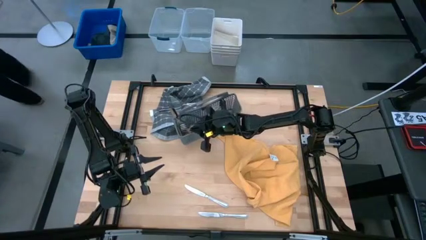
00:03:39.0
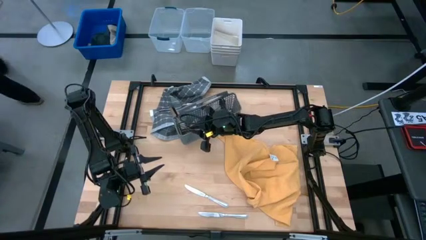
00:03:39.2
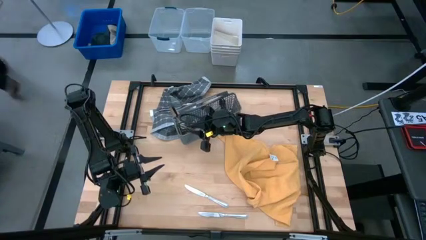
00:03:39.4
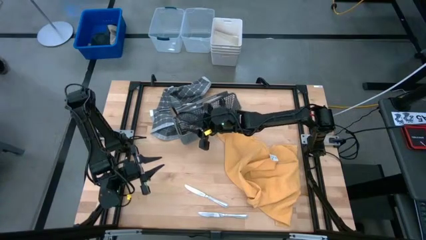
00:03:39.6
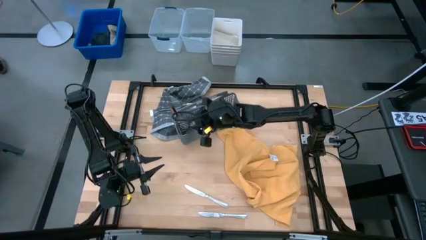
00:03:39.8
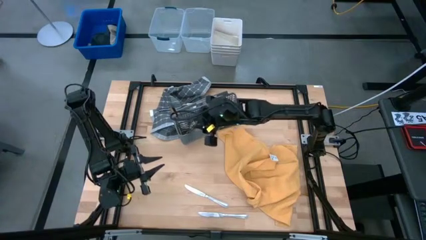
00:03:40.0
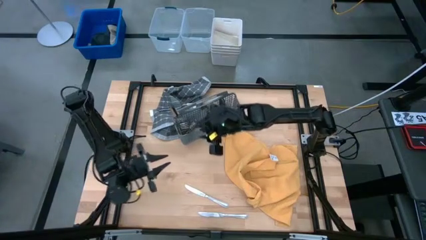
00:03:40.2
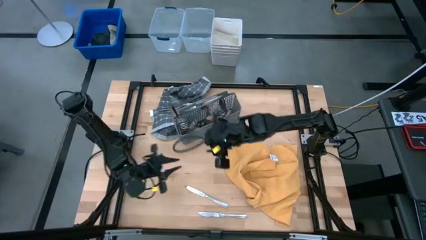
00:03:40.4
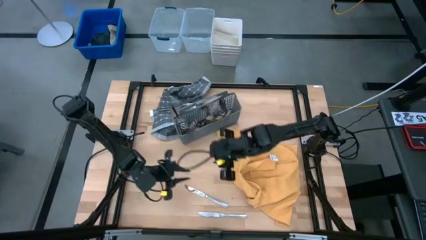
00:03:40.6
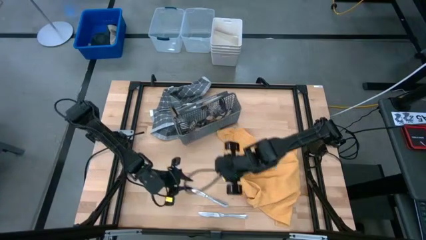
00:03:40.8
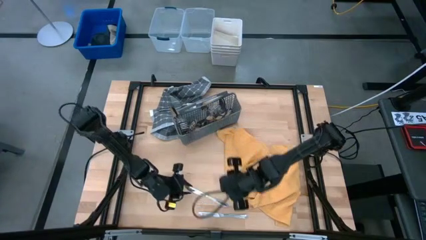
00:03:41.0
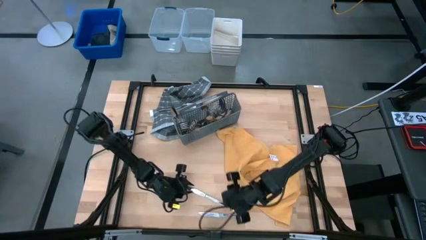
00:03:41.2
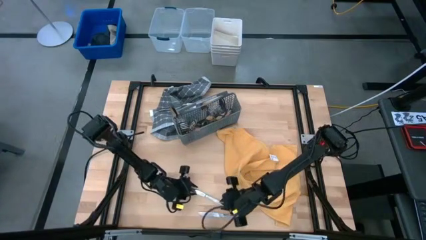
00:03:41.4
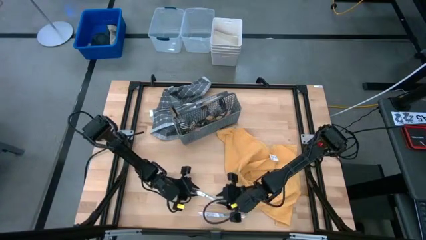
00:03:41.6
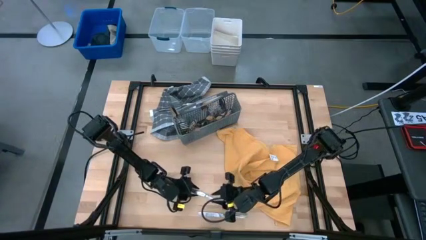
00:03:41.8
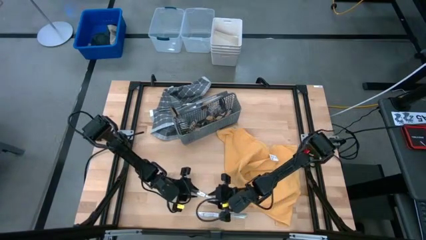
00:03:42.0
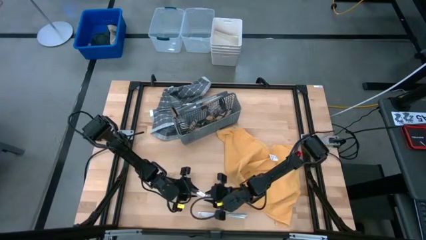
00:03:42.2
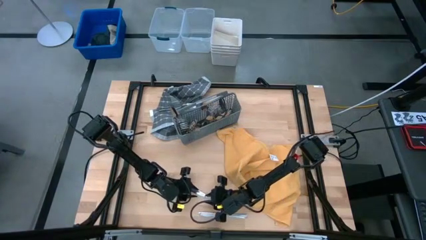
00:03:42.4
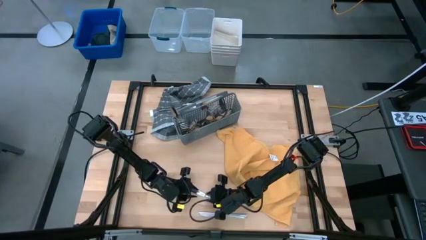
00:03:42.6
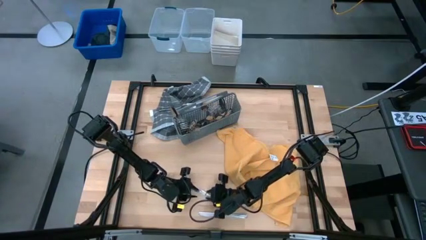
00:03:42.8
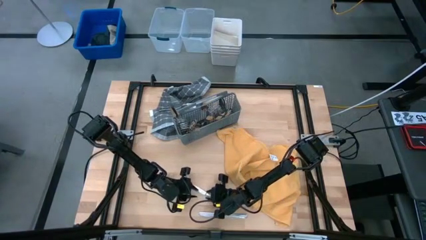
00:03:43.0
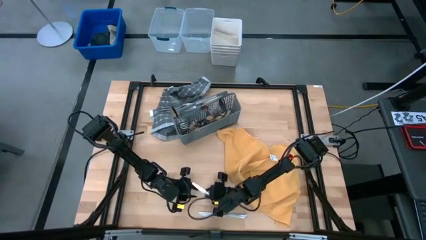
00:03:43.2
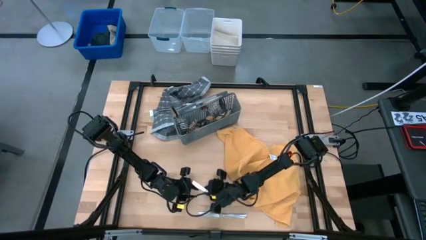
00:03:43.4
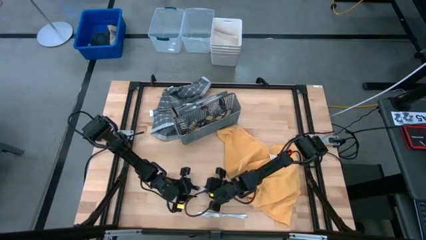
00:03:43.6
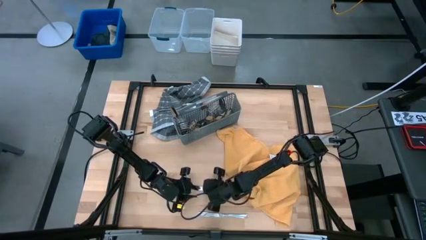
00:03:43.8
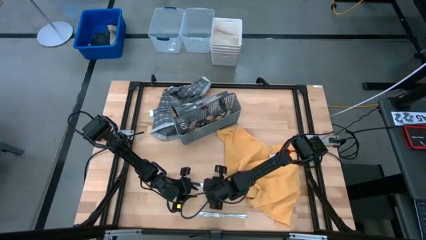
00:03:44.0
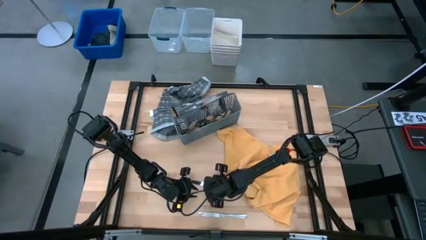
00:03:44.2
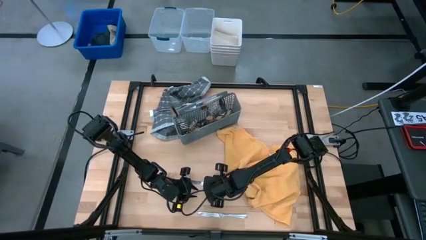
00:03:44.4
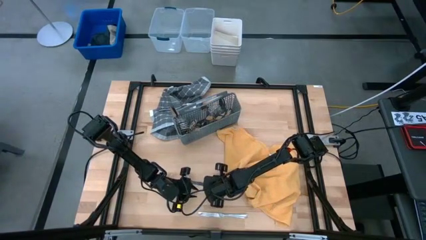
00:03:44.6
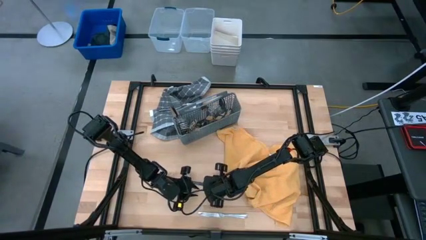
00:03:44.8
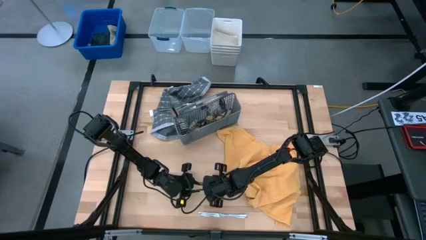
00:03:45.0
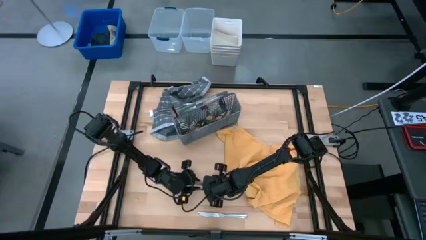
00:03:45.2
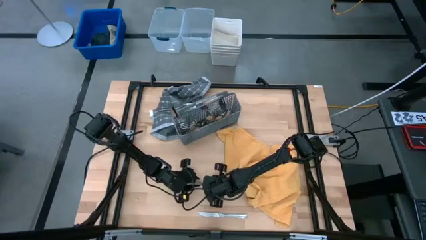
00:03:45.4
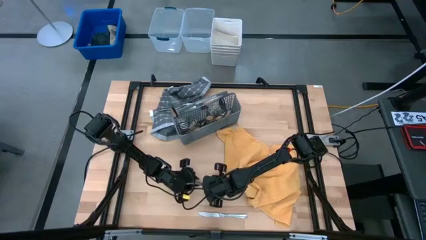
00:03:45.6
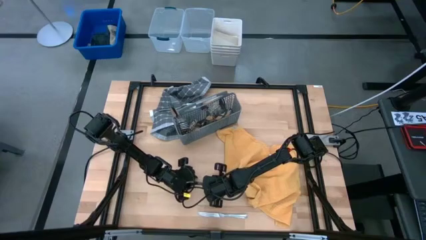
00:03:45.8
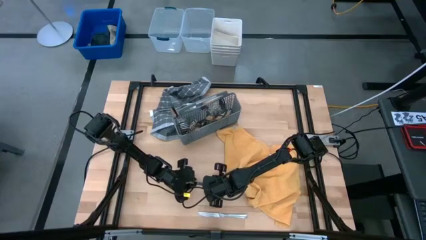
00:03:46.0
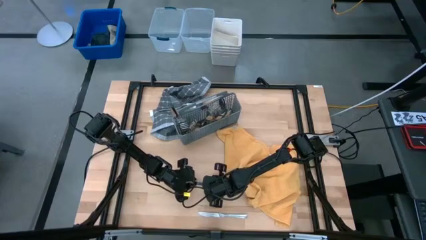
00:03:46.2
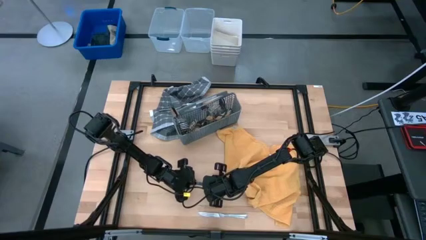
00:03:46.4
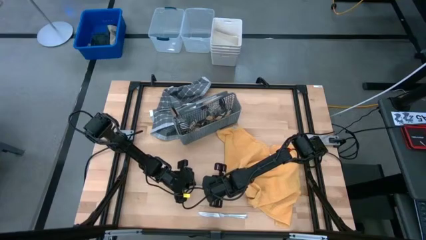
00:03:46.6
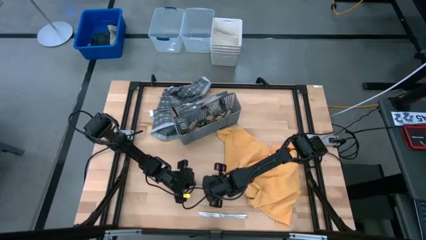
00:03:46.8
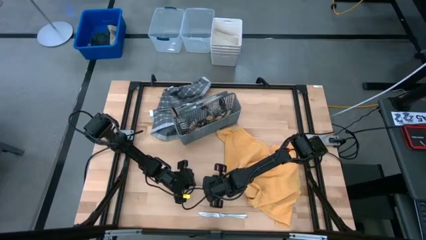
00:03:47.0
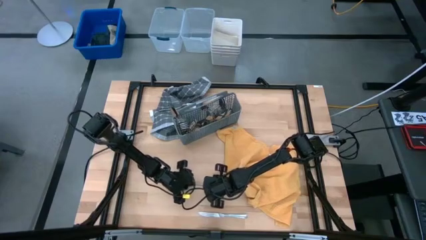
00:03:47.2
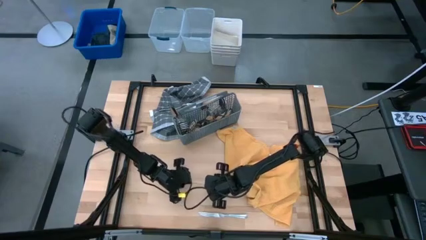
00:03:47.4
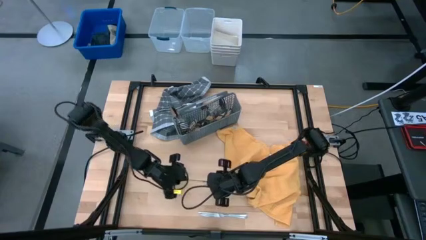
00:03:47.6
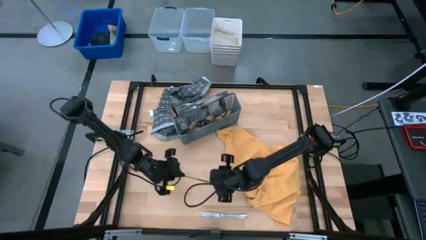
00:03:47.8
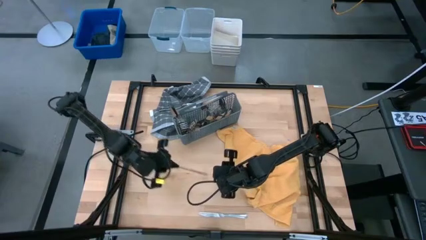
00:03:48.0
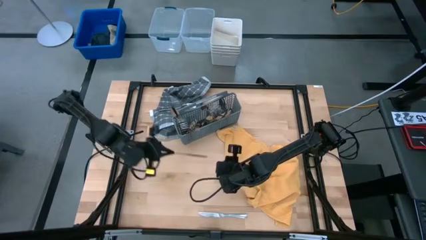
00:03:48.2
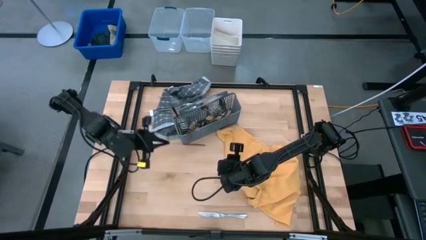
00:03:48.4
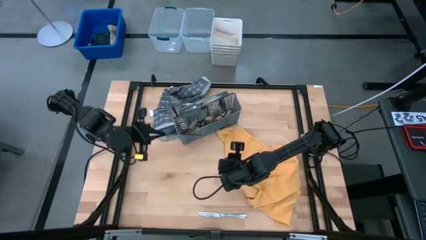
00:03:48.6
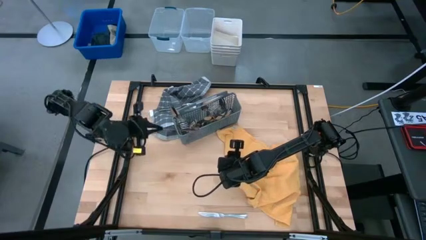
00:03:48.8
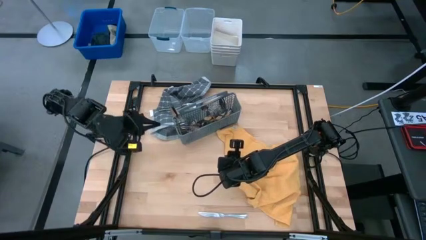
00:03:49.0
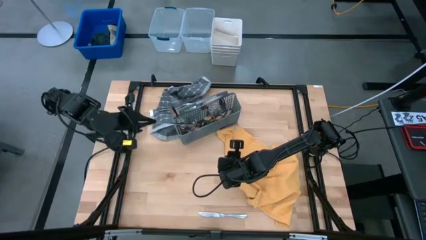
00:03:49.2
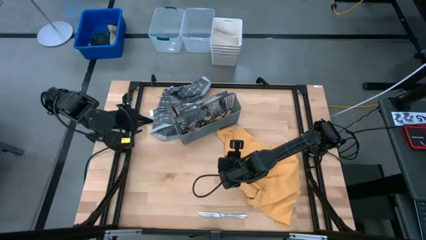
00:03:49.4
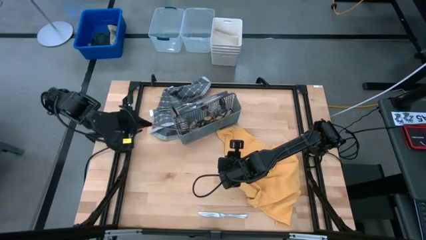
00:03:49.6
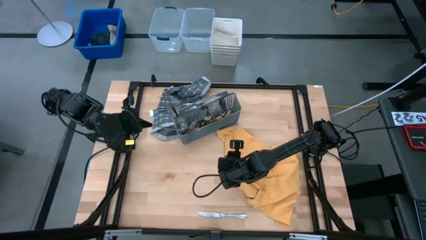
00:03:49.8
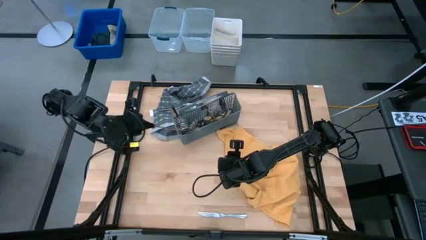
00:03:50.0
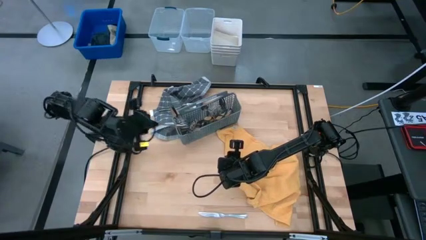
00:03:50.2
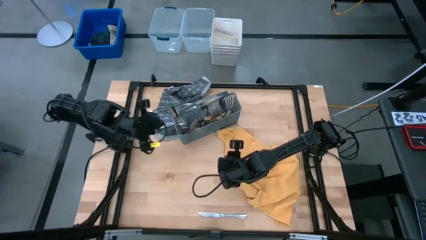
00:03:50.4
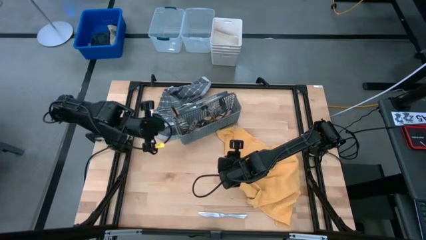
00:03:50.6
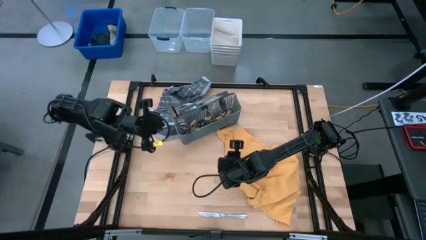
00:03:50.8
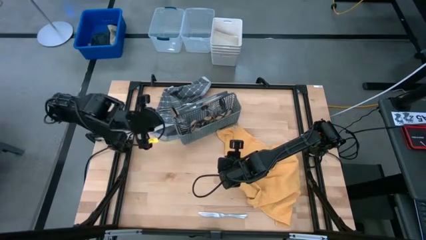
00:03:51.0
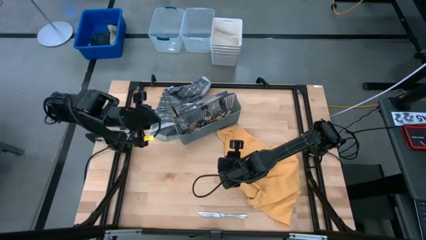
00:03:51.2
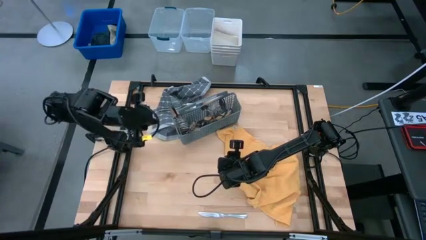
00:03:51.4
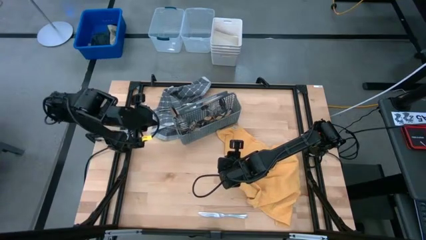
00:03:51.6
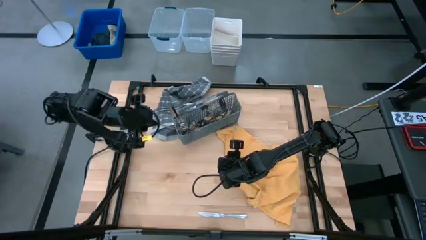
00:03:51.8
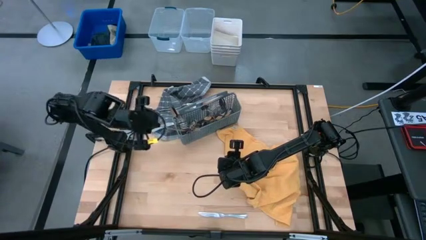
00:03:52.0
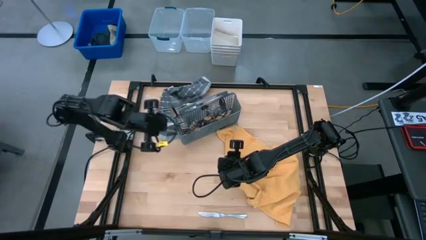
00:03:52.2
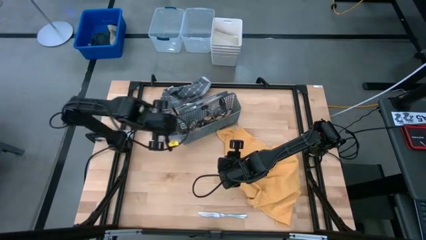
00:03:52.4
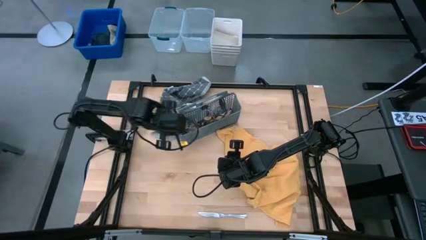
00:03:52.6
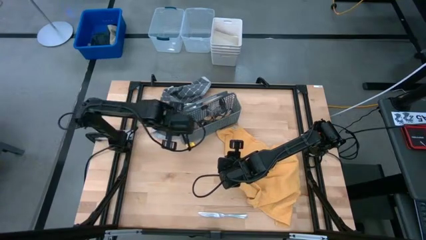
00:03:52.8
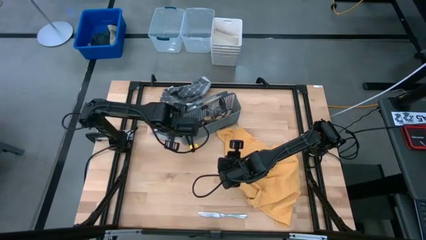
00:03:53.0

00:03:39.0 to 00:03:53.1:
Task: Sort silverware
Put the silver knife into the gray silverware basket
